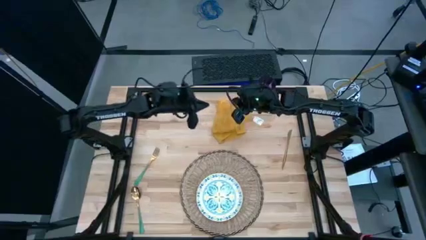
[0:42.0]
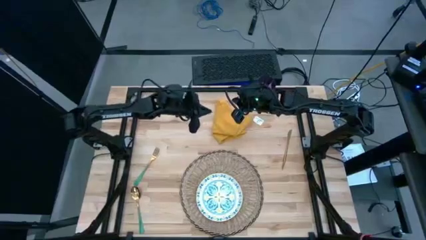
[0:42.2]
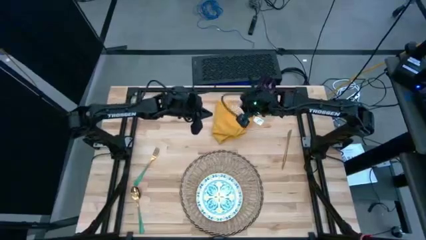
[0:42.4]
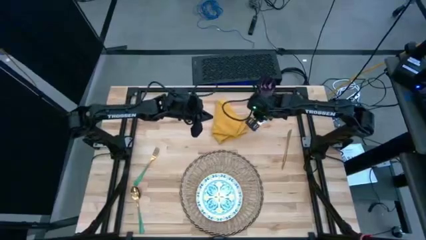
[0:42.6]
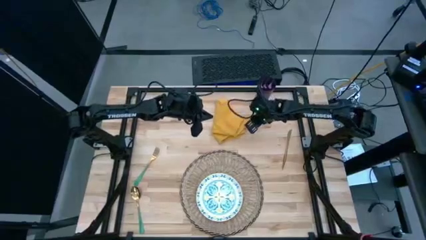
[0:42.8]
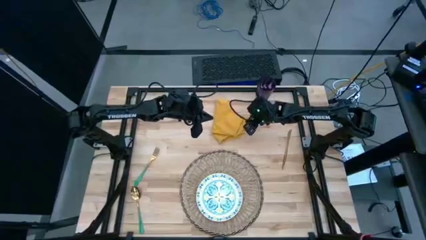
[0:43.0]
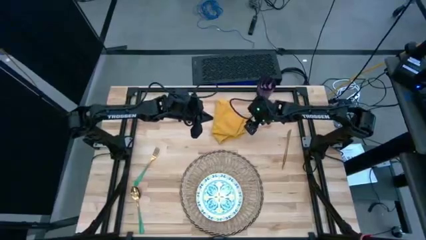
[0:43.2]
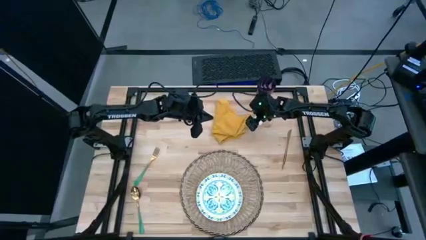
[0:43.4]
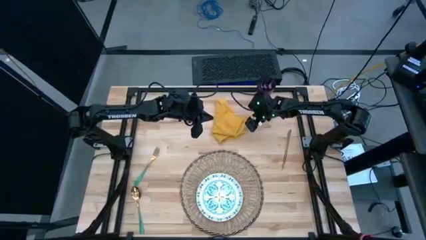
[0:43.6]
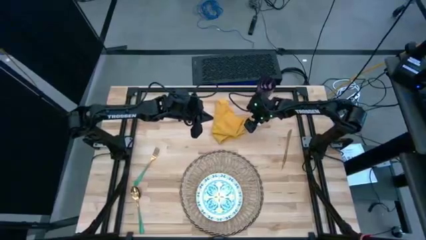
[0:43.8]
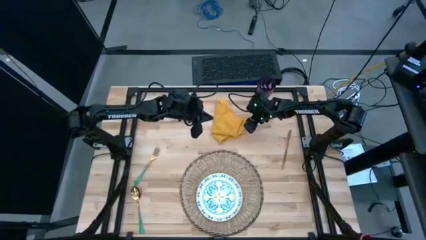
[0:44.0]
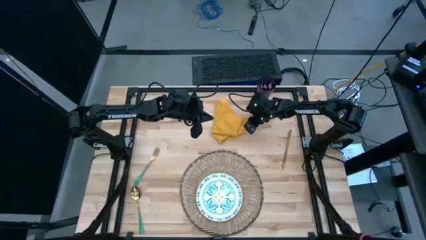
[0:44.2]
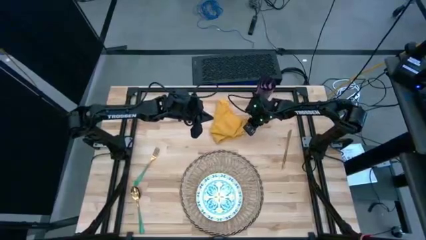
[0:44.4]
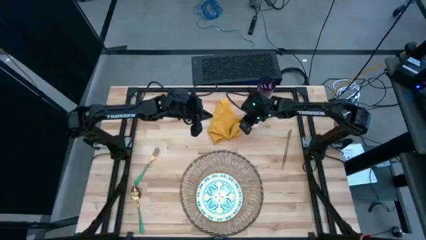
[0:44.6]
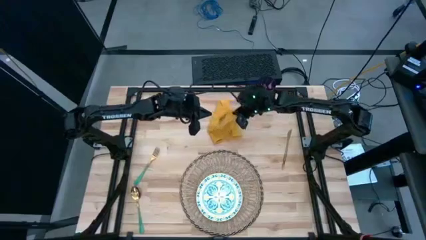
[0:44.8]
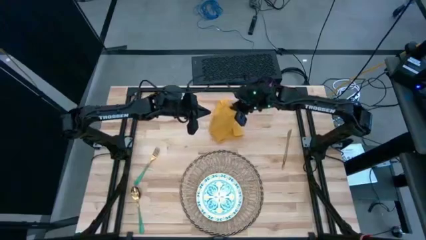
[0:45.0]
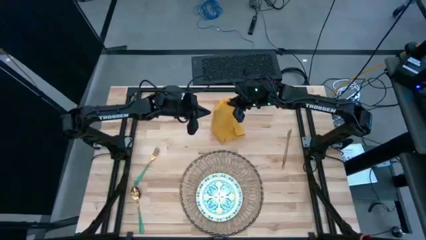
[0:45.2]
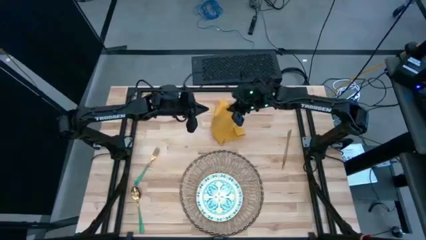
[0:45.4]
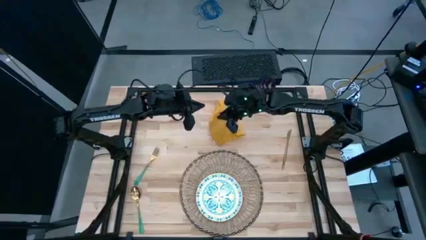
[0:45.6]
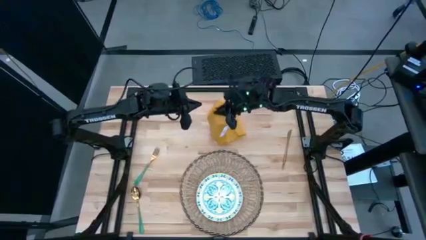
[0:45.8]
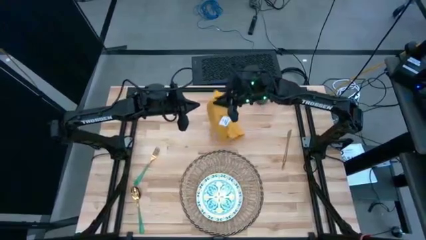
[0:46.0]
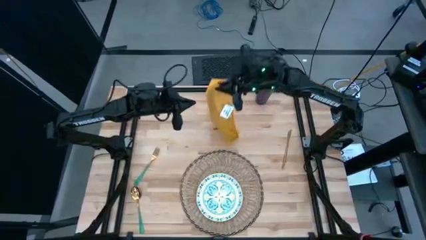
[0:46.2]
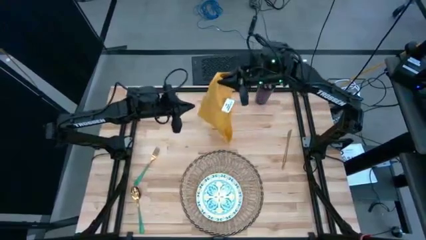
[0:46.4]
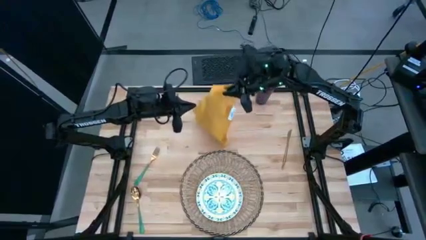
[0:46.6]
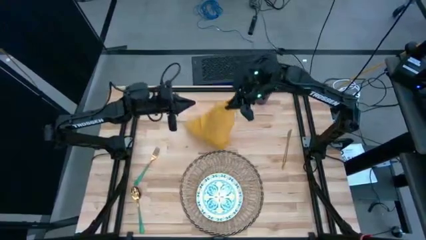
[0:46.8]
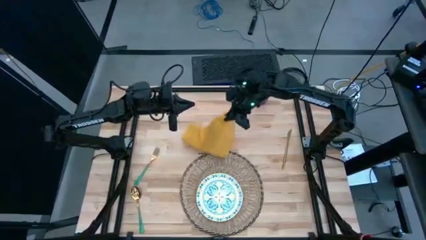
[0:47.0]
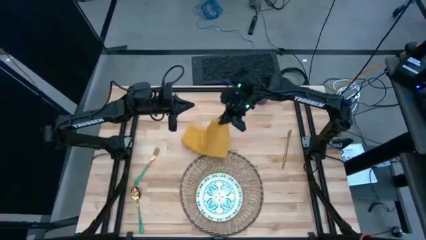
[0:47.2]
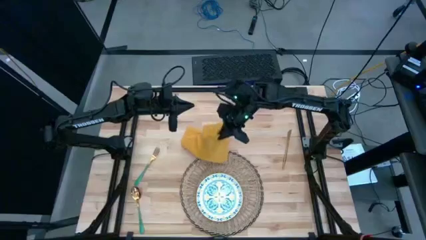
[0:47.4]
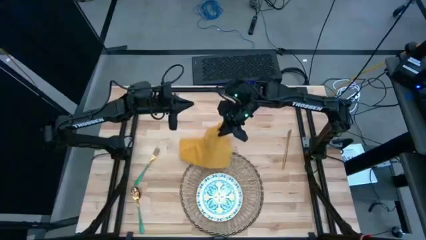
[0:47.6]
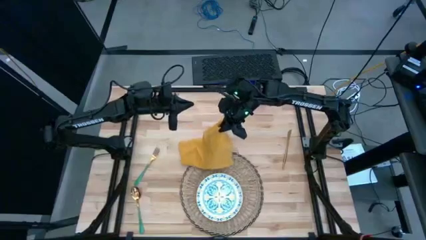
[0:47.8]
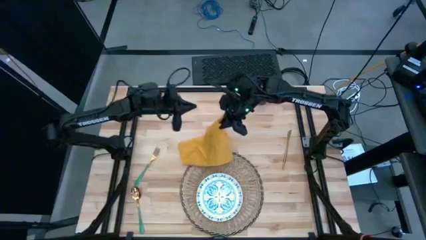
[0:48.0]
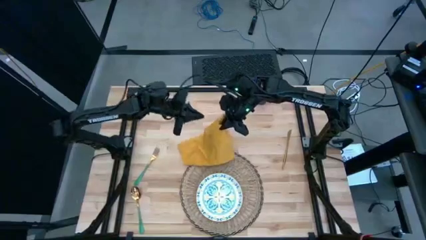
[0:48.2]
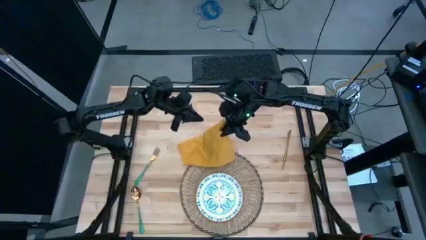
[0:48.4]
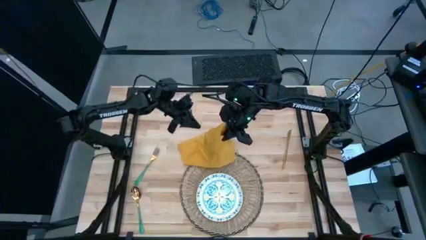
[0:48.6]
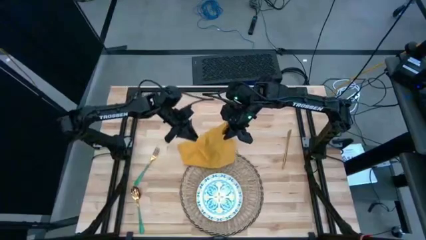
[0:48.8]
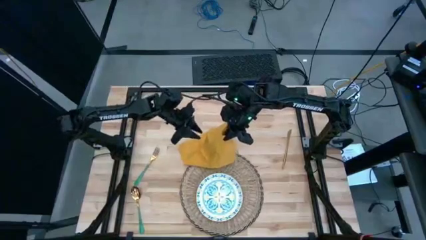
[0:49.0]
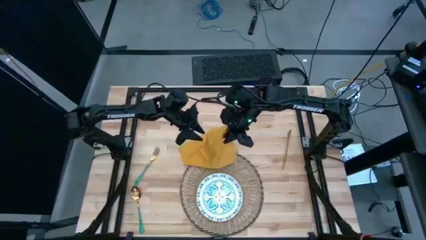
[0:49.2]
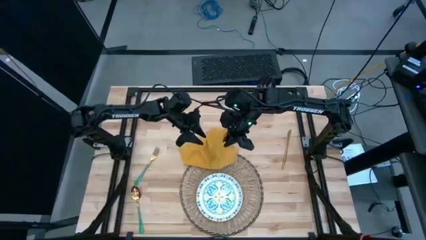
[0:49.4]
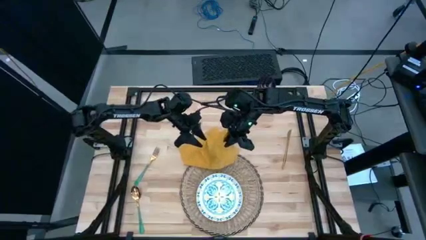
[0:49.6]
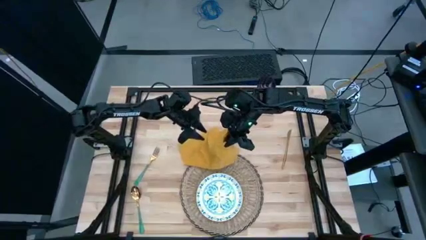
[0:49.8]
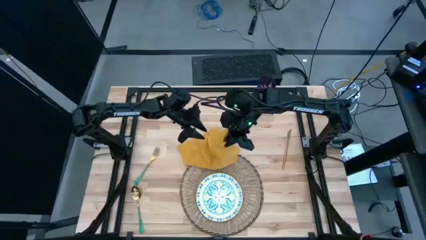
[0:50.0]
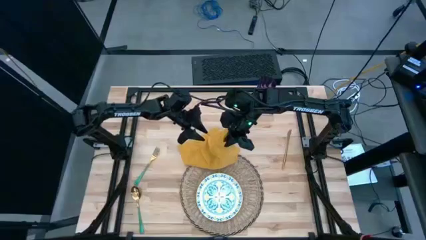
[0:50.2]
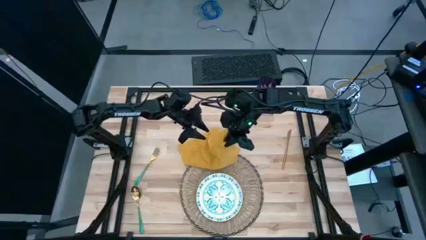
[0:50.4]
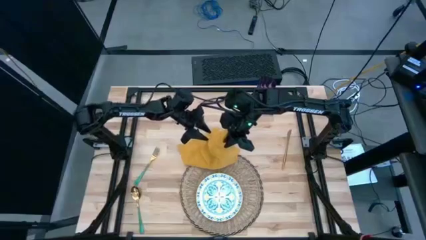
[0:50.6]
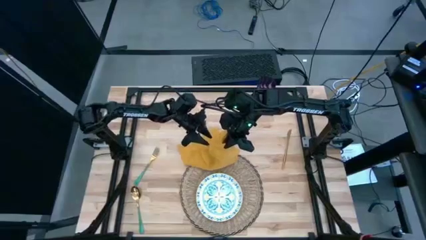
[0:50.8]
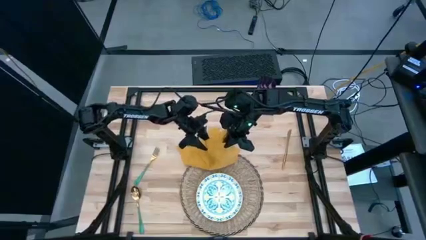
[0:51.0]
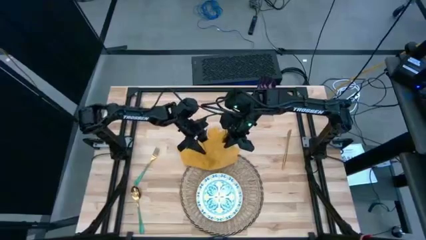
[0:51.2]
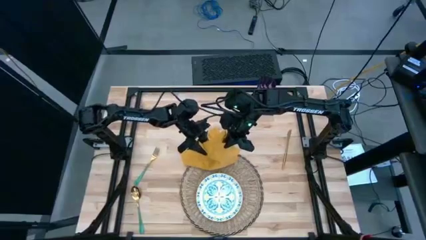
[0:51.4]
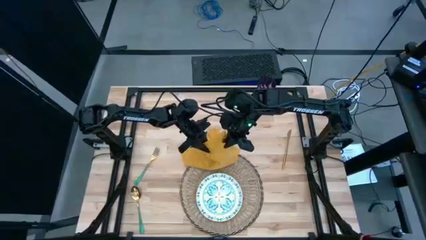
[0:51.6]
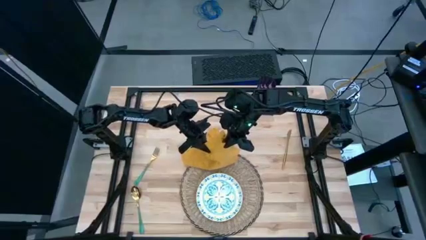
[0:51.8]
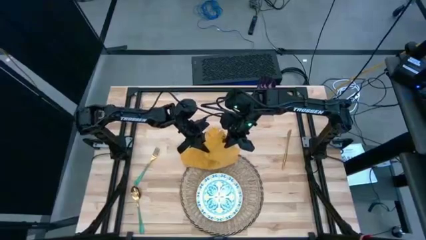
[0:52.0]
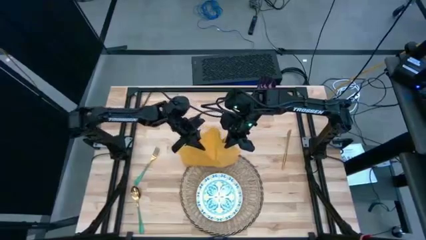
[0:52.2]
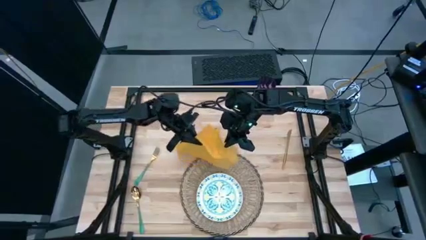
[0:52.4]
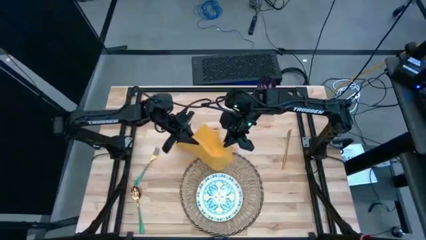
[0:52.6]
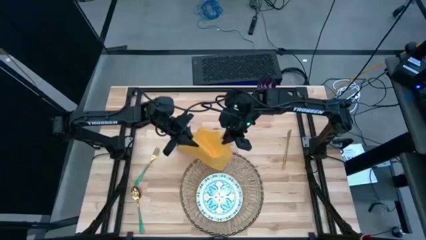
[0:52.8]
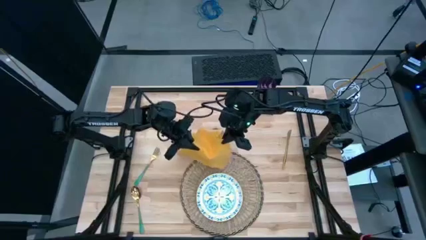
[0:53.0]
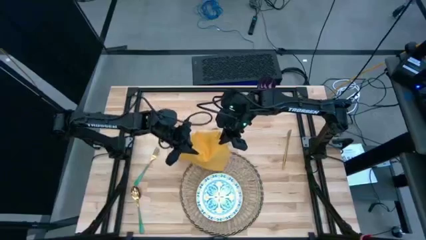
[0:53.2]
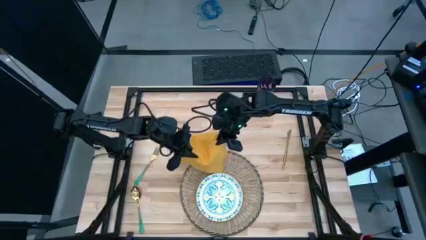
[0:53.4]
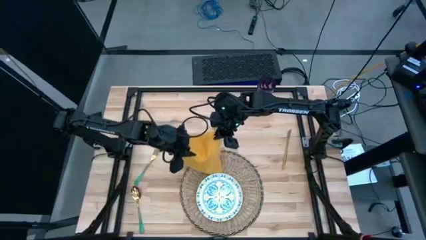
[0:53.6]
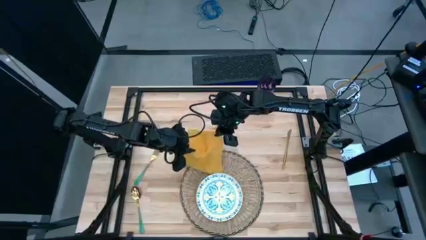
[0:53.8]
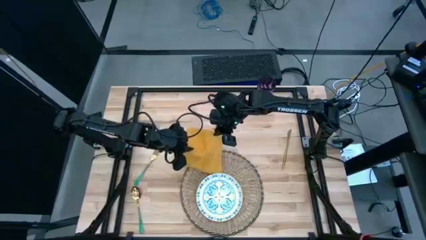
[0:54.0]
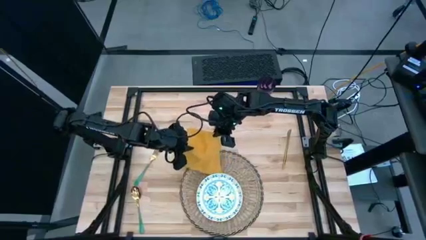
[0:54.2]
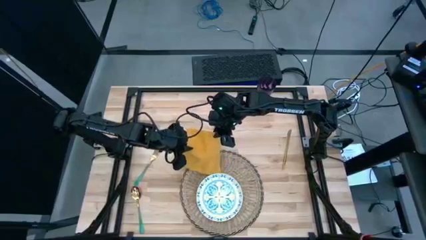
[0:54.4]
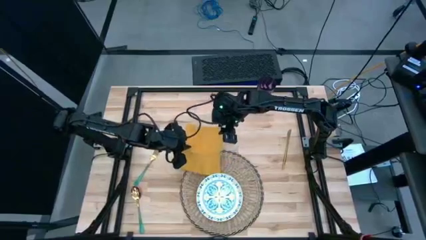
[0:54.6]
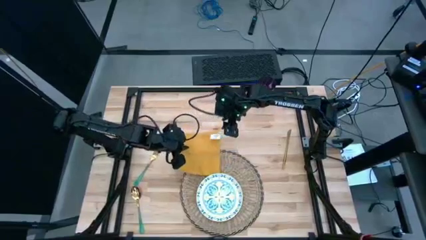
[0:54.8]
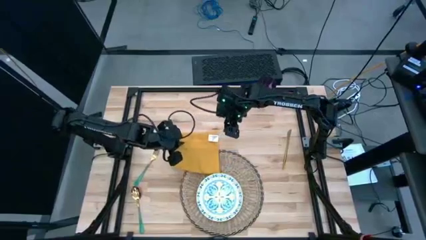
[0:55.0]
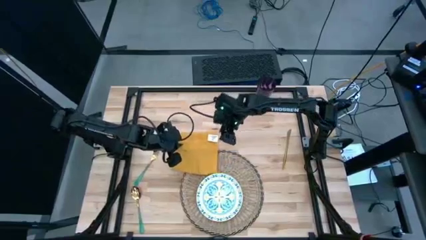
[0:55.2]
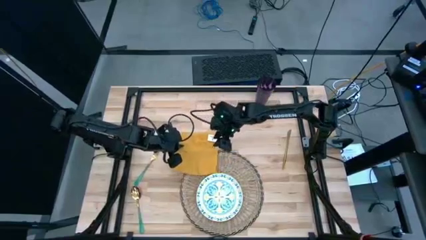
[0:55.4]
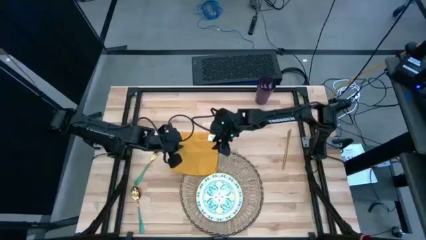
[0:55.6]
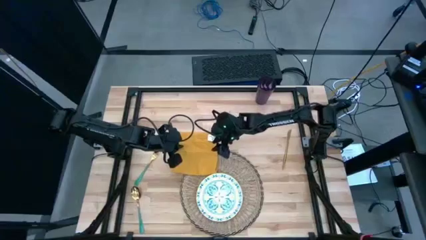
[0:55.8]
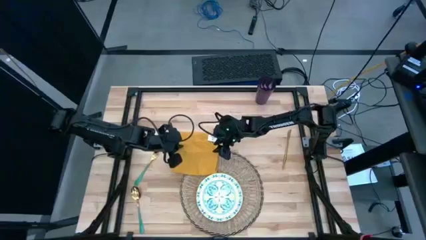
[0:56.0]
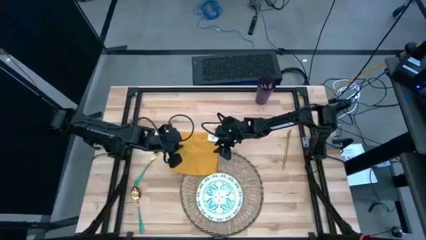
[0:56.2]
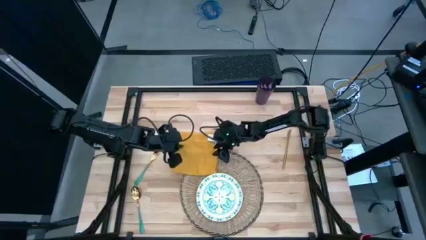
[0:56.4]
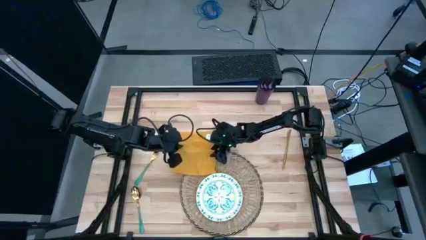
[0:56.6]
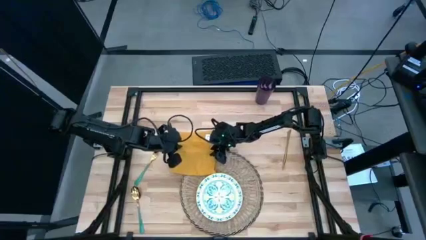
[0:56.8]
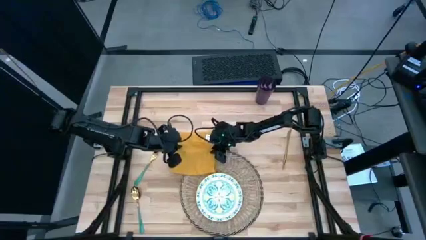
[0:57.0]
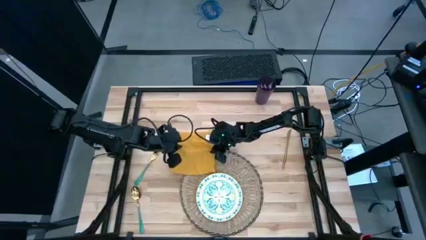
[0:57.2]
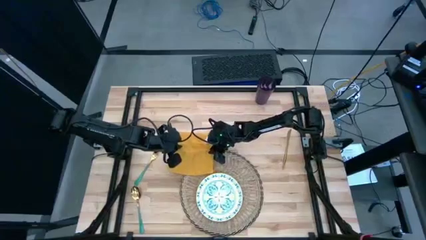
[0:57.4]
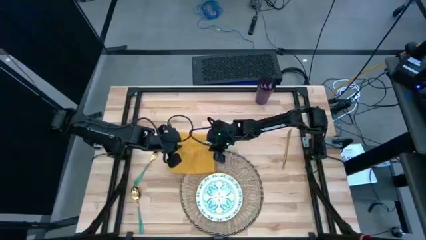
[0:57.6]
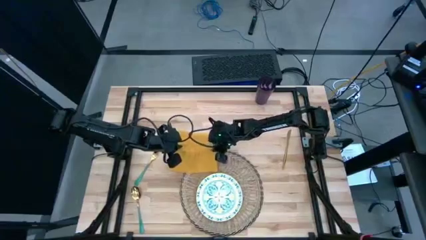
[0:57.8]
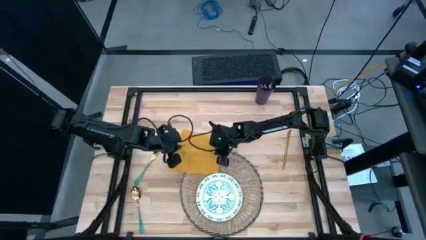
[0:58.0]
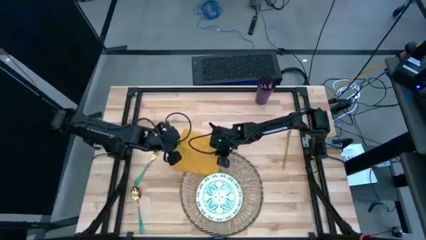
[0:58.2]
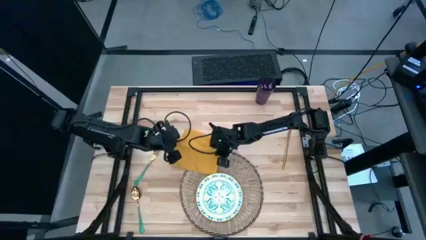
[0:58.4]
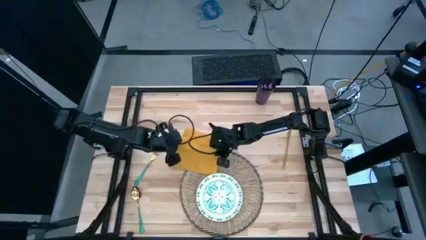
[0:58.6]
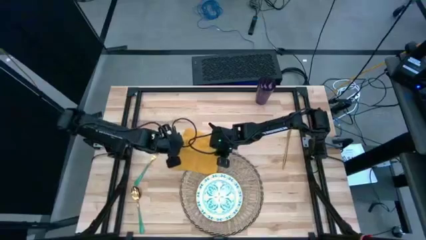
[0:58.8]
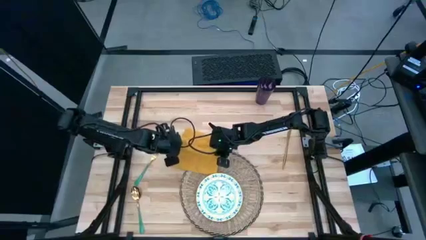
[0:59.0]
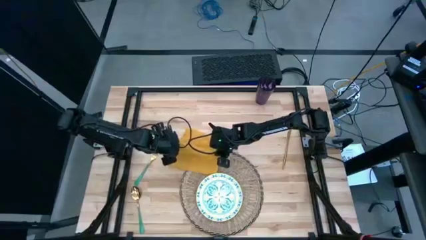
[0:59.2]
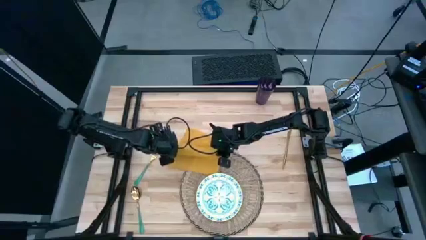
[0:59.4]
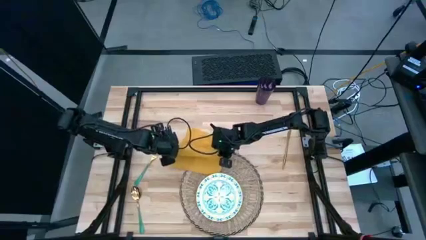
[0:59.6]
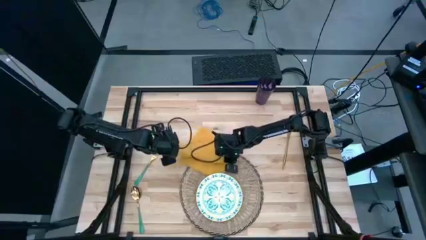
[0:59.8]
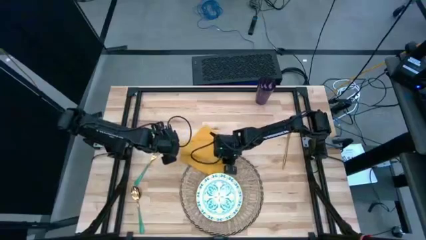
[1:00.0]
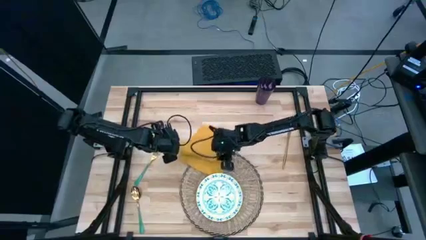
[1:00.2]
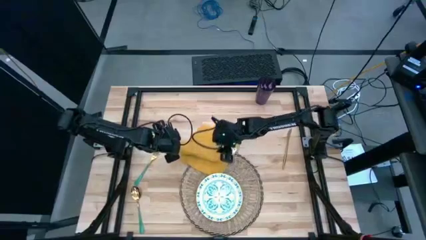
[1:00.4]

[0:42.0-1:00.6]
Task: Set table place
Fold the yellow napkin
